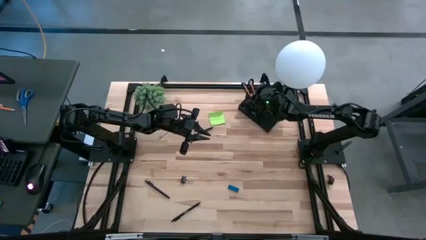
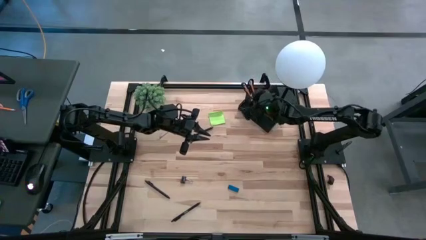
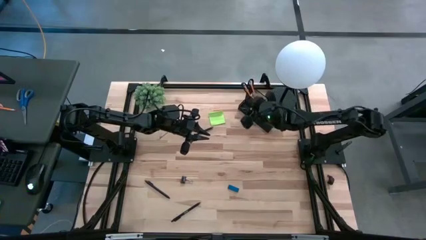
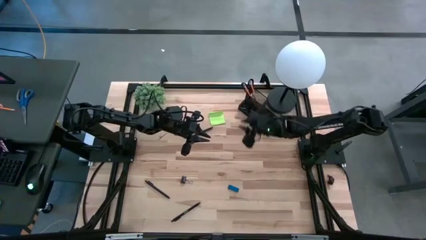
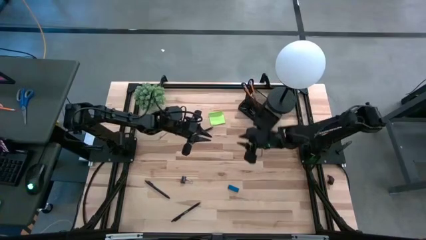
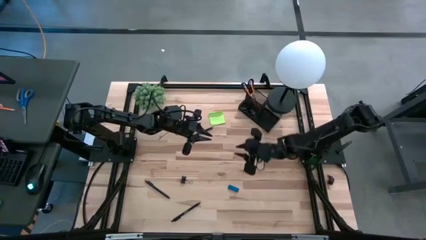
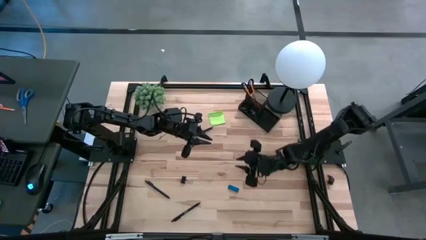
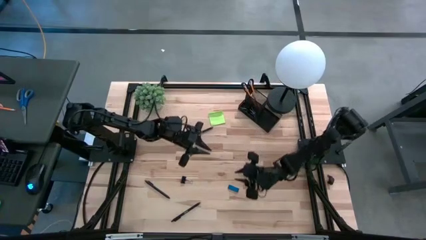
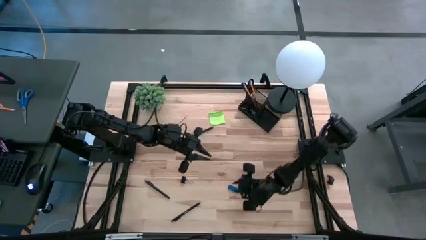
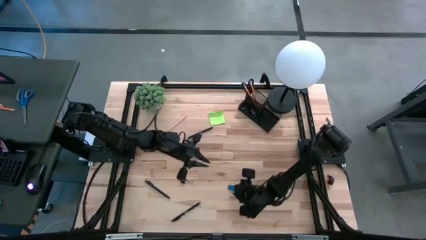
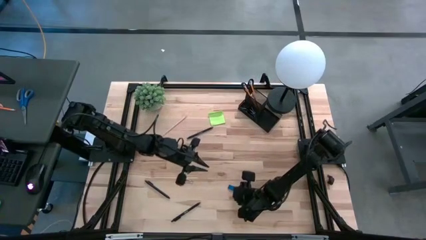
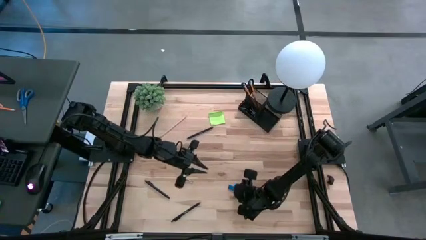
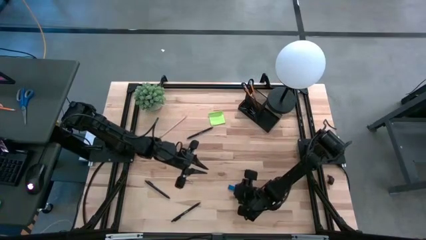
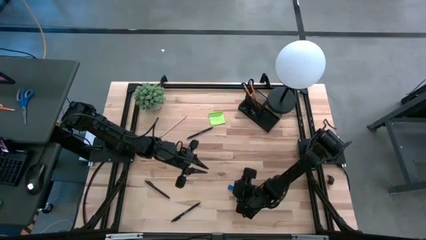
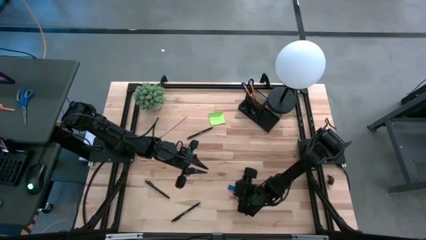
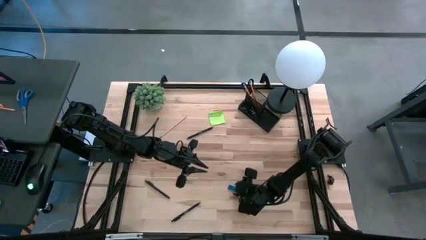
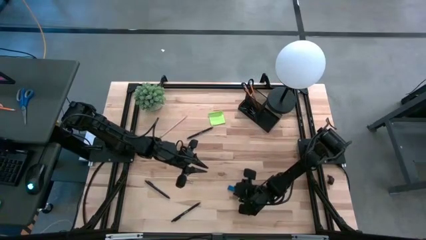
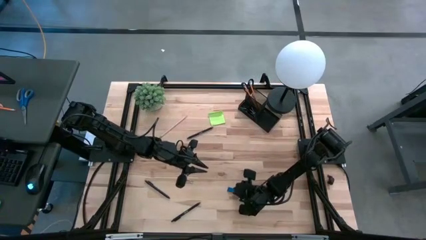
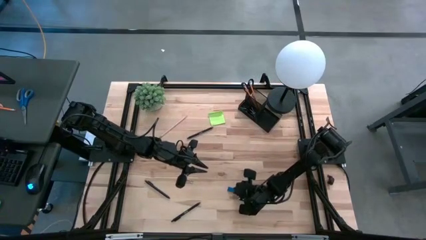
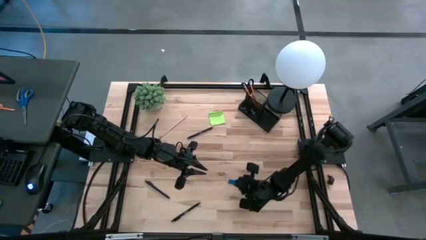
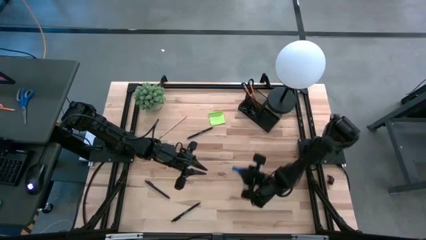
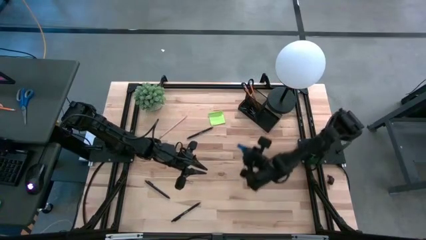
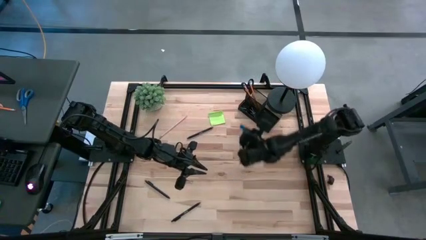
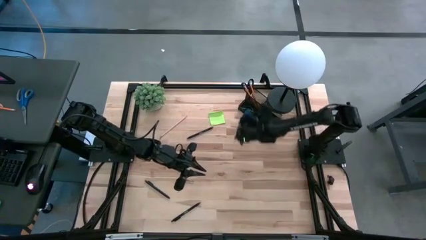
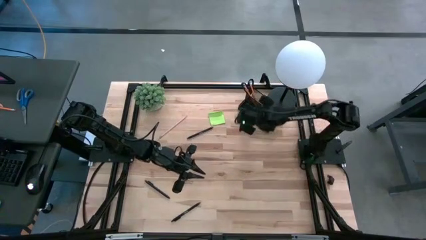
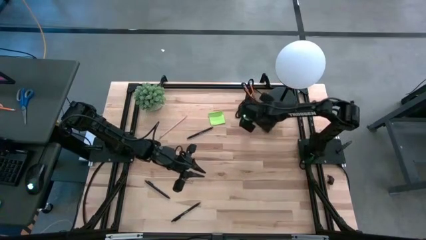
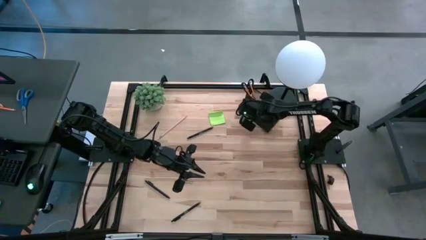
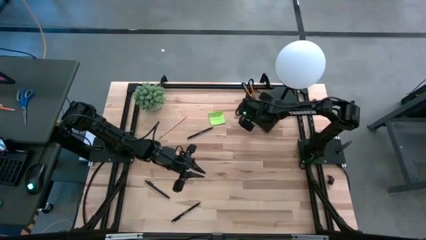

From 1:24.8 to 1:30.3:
Task: Pick and place office supplies into organizer
Put the blue eraser into the black desk organizer

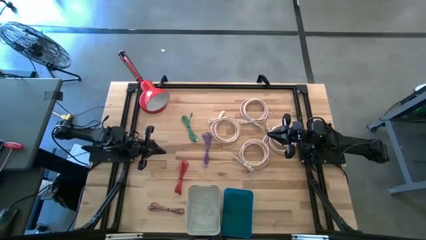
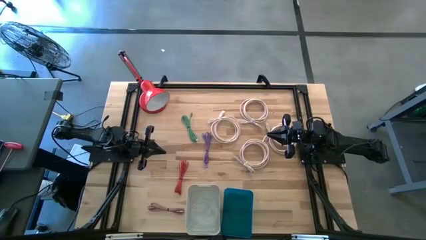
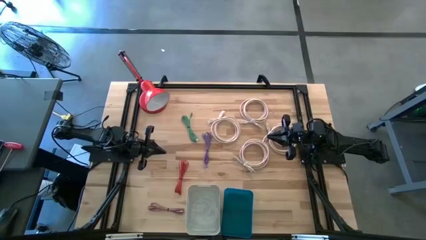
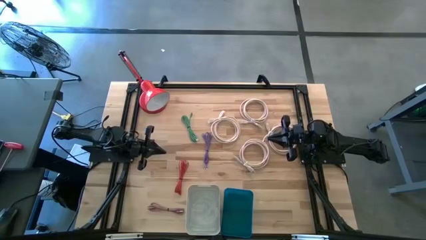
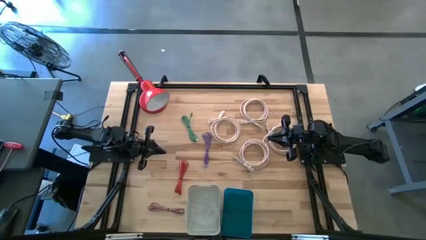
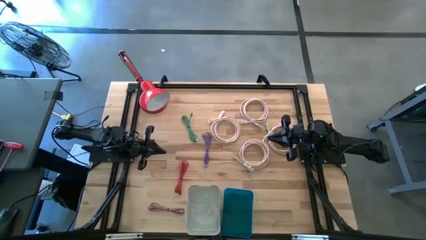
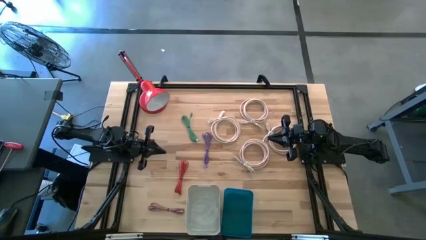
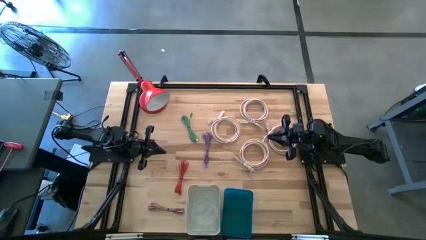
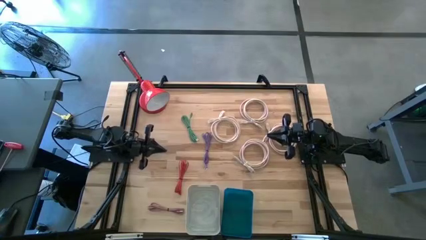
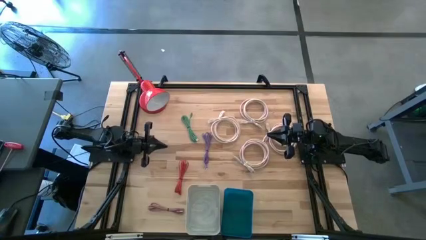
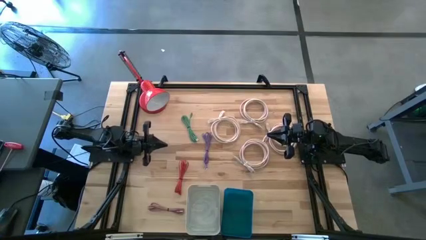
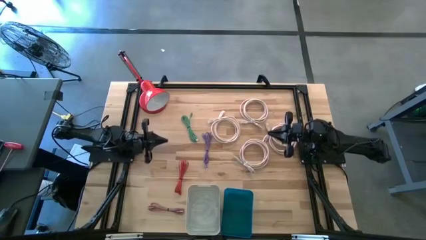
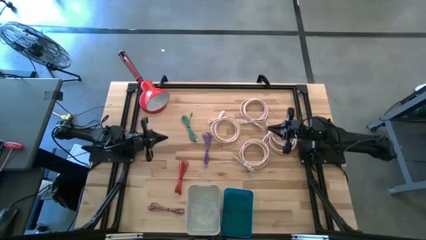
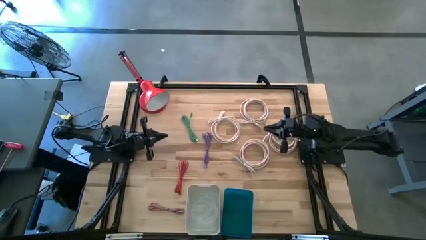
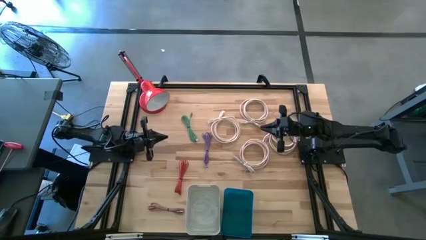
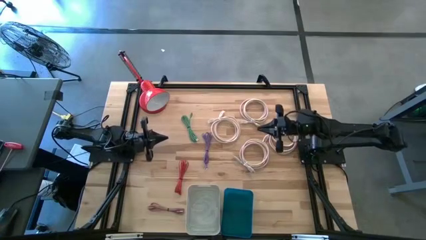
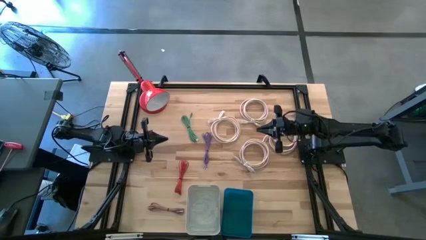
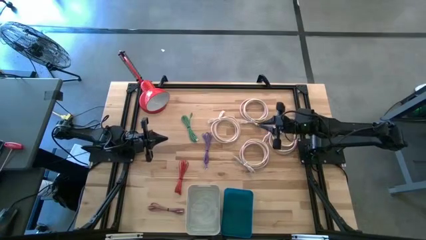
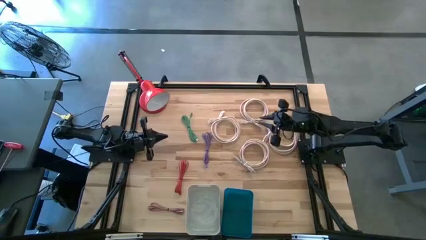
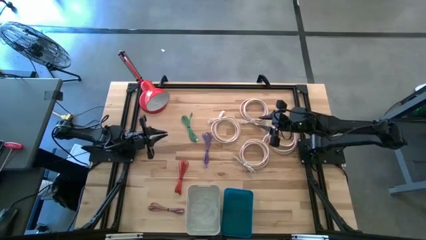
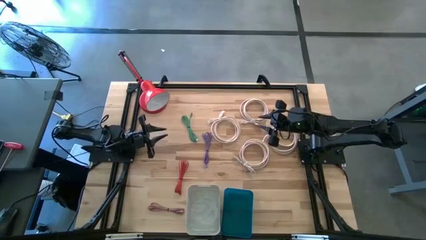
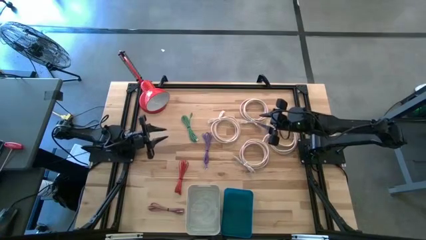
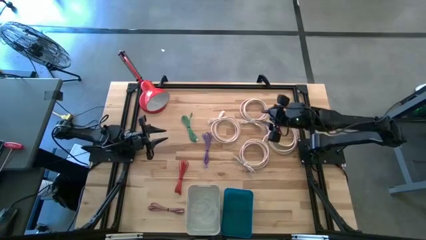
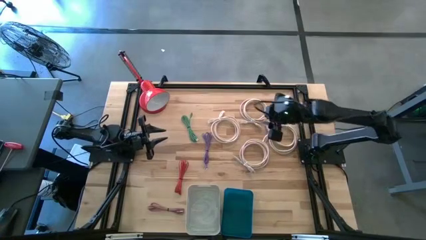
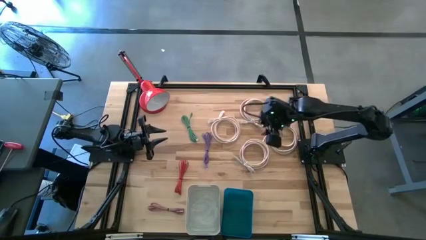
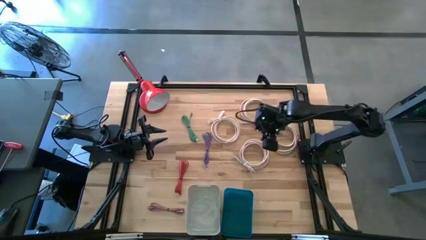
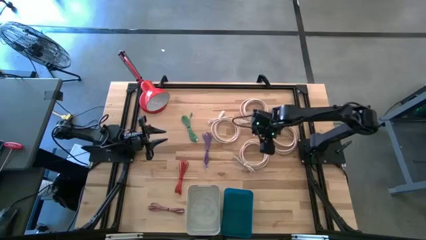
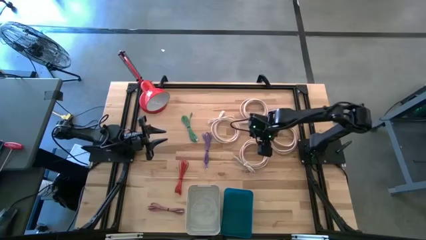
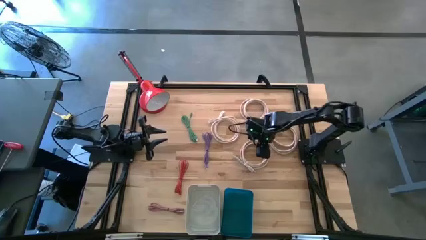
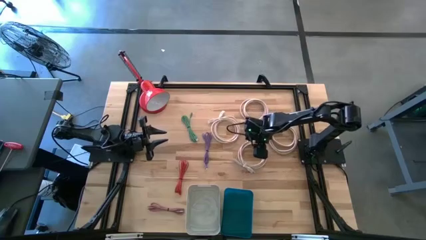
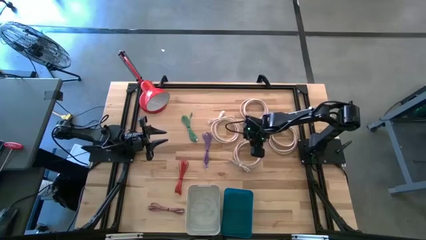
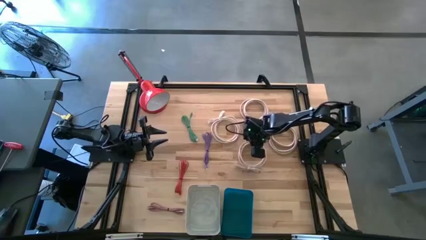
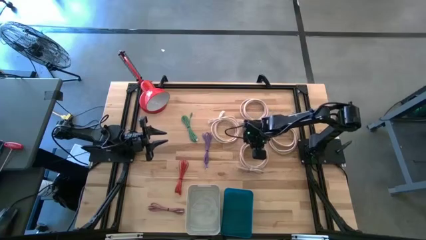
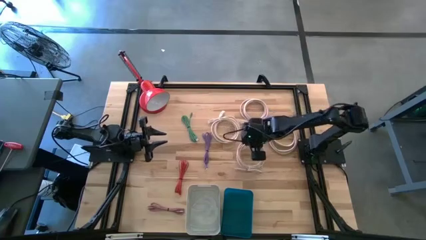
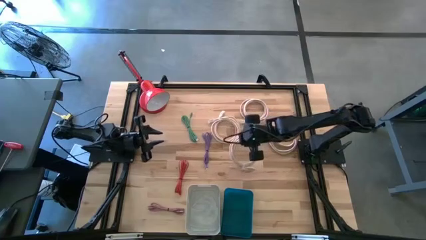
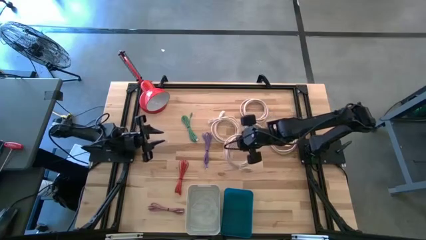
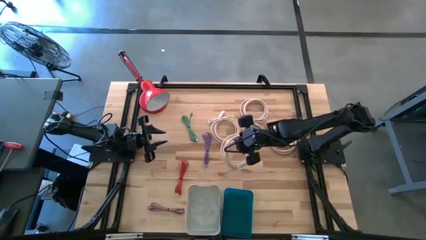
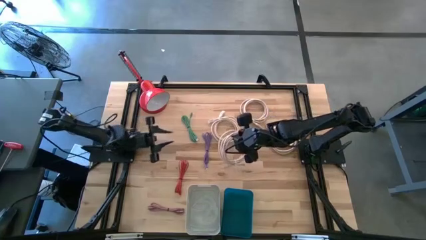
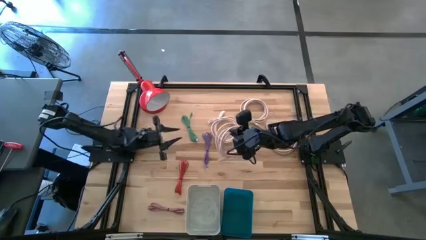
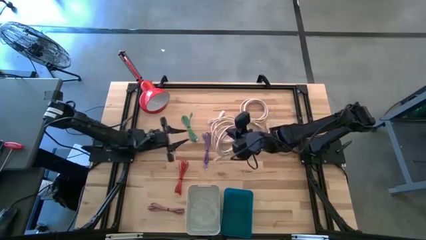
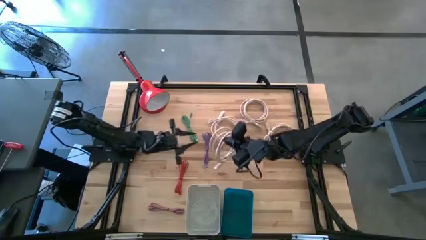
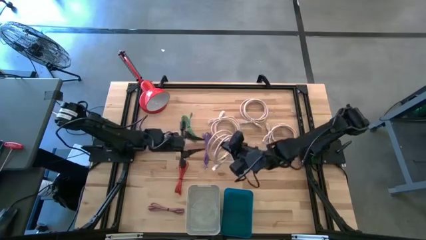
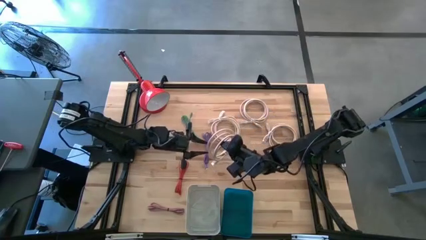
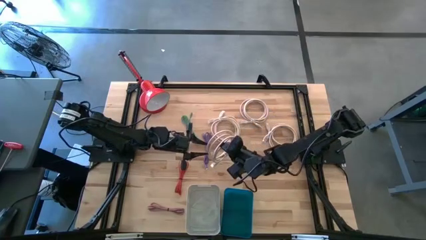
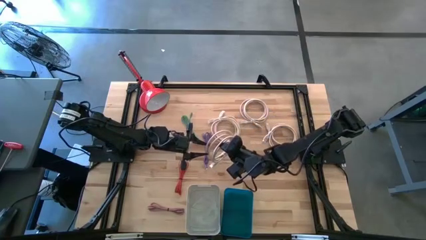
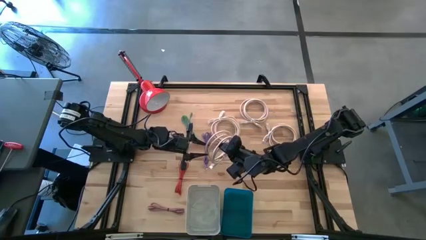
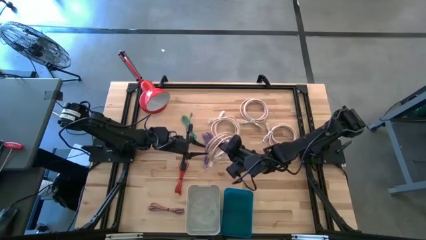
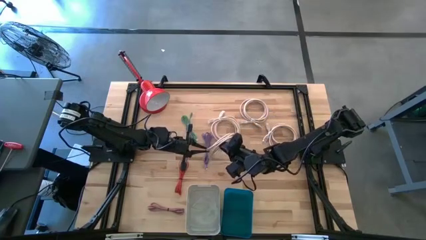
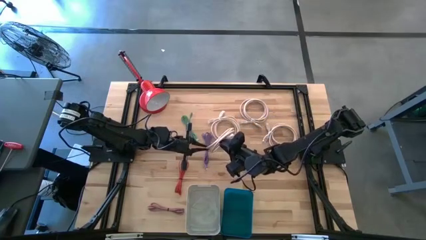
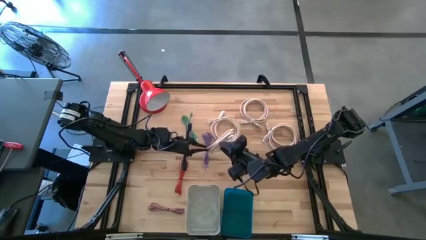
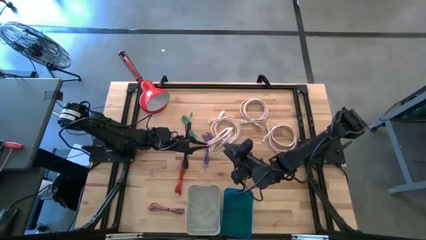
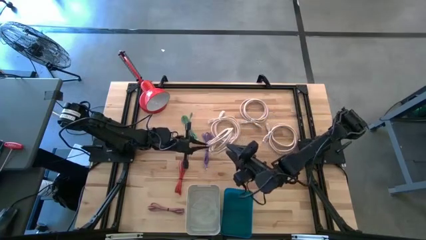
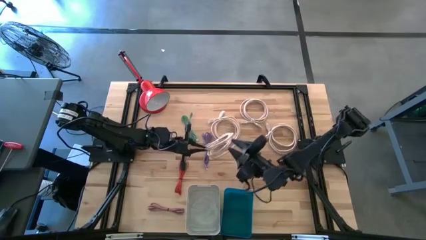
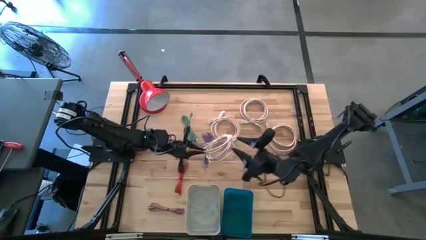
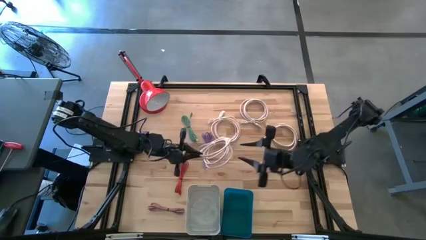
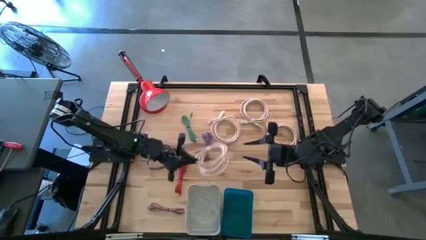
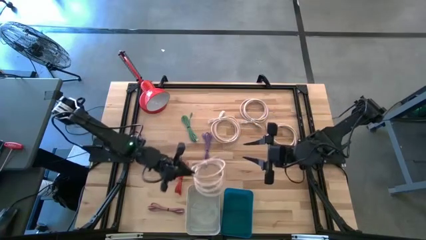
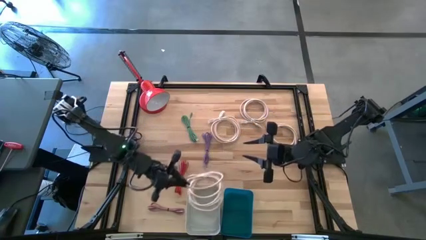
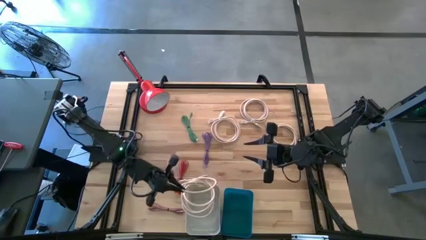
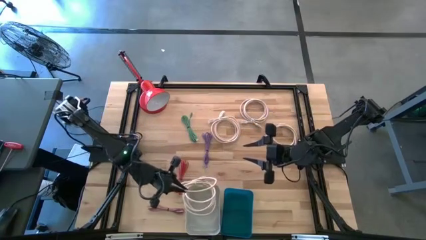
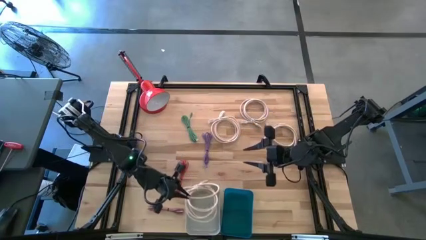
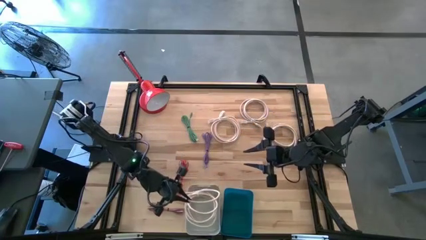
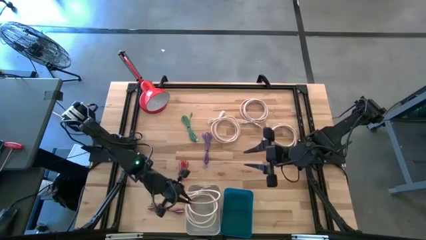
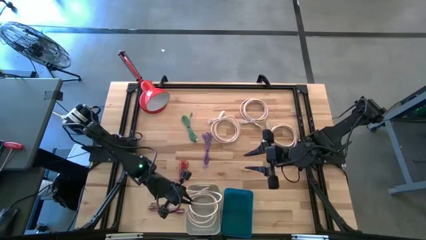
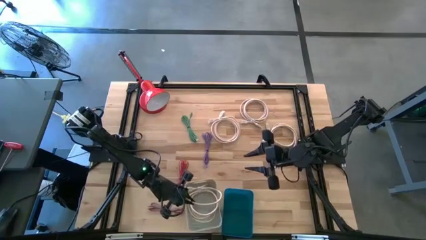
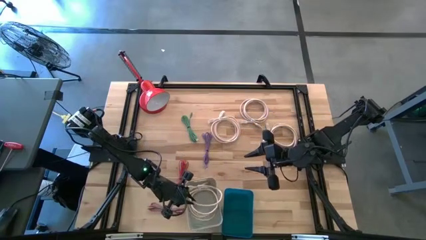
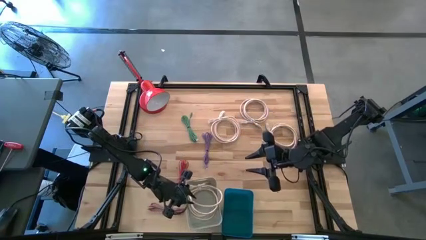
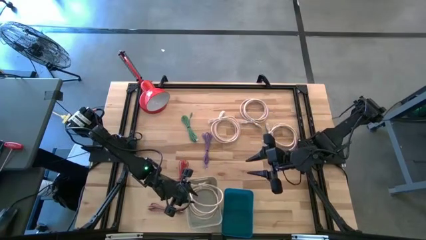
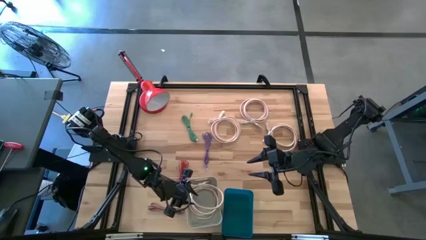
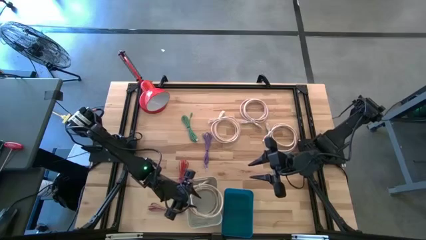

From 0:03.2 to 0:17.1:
Task: Pick & Place USB Port
Put the light brown HDMI cable into the white bin
